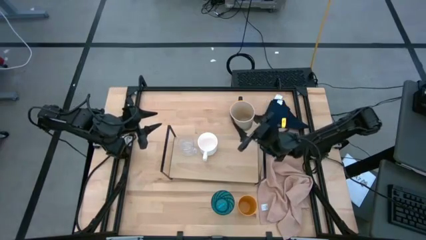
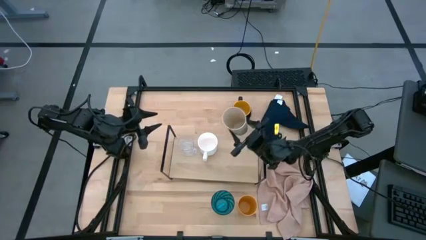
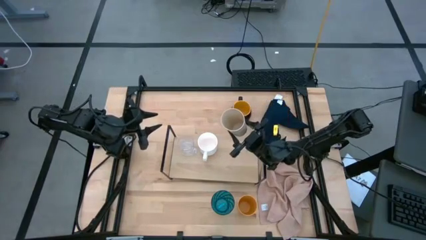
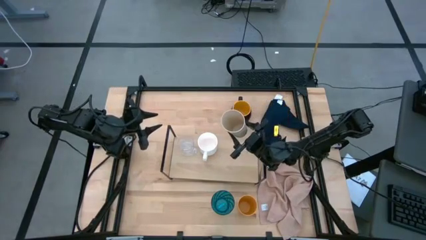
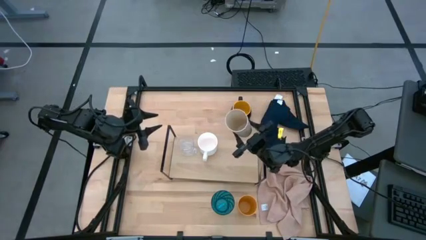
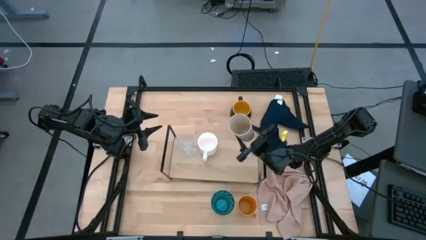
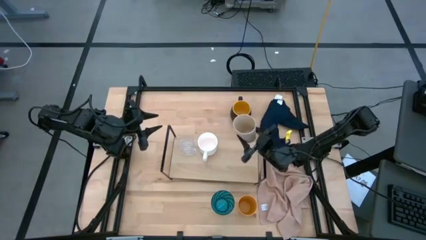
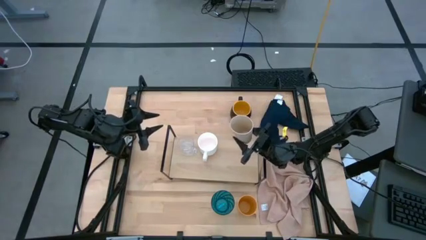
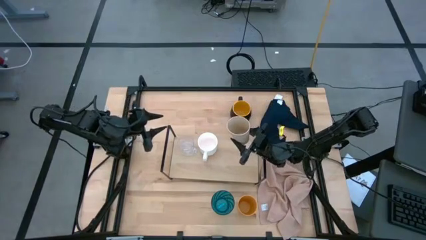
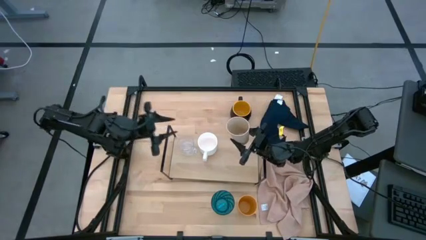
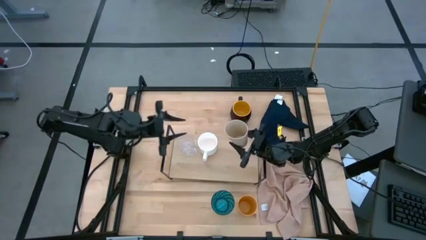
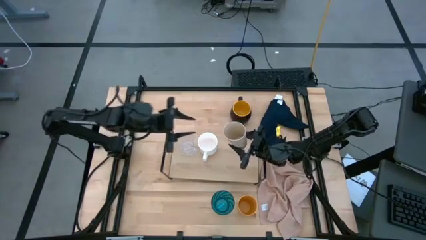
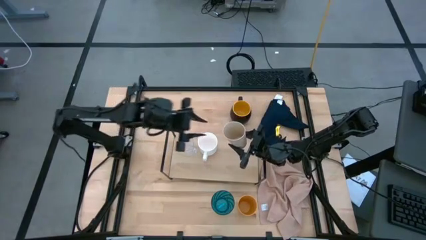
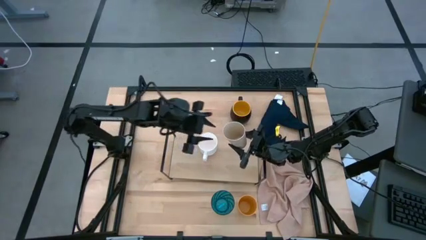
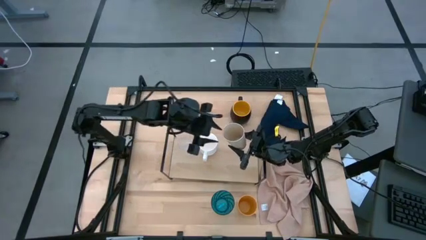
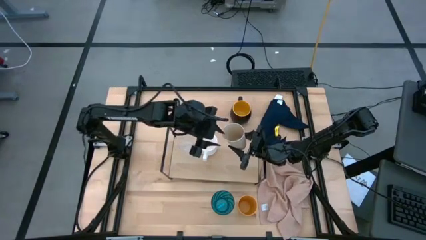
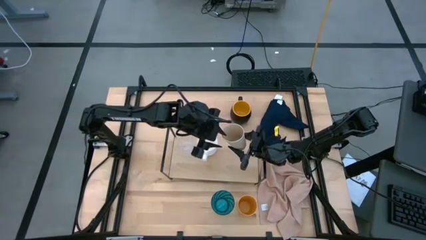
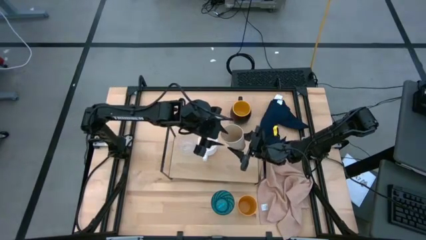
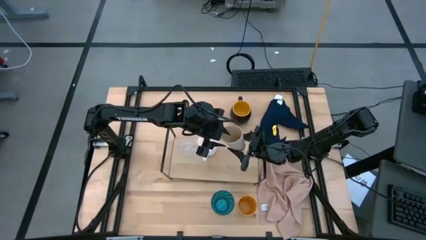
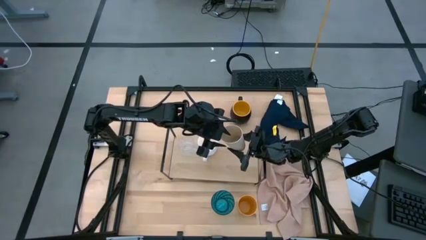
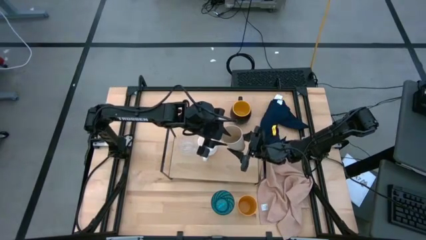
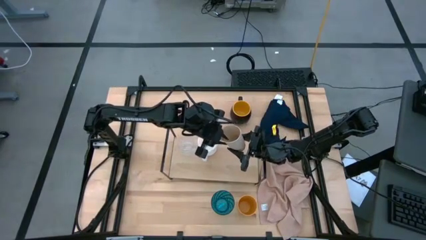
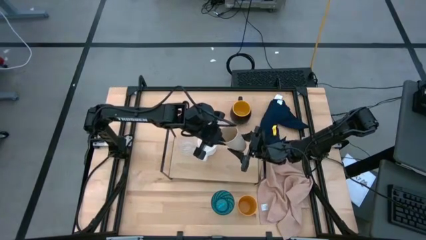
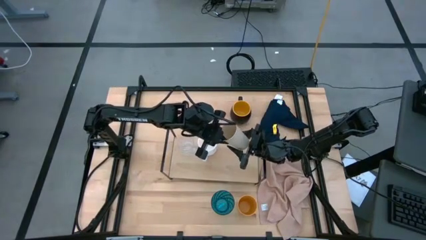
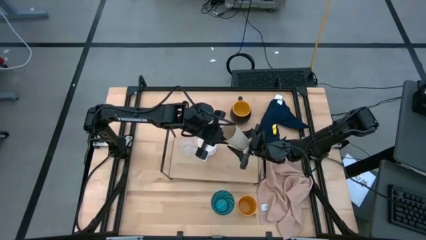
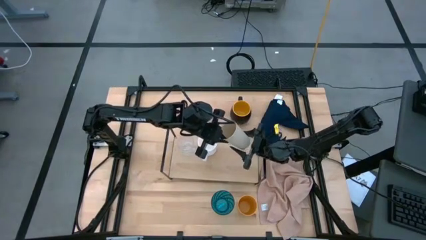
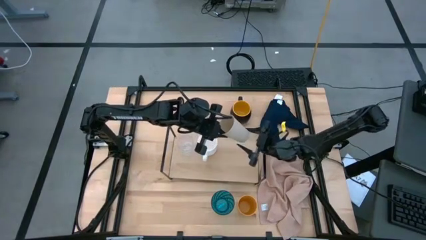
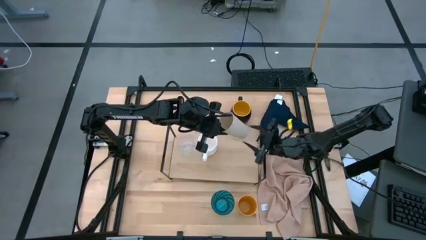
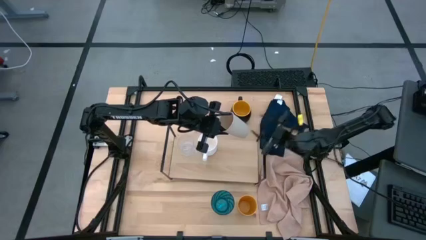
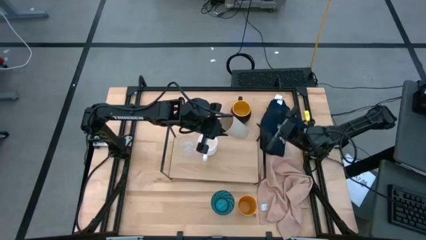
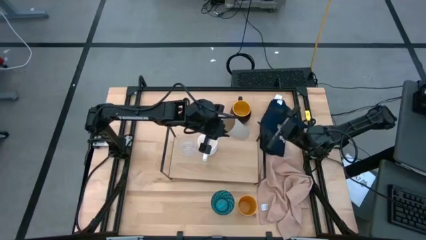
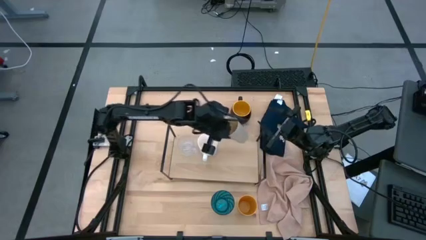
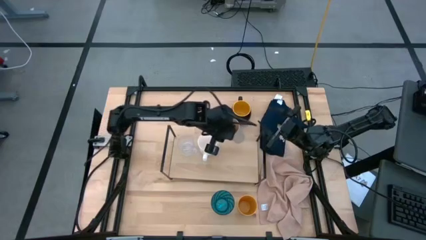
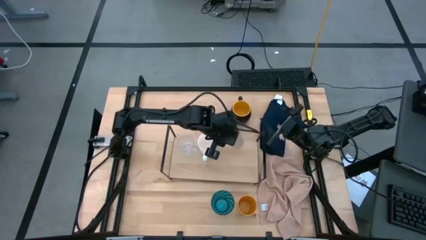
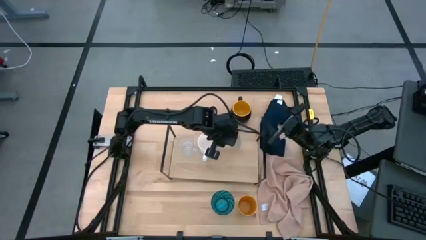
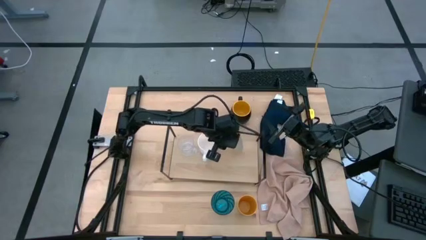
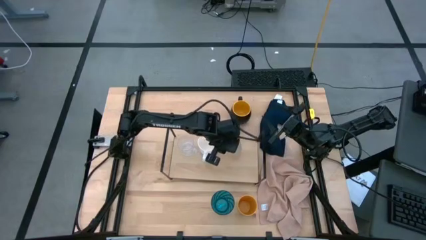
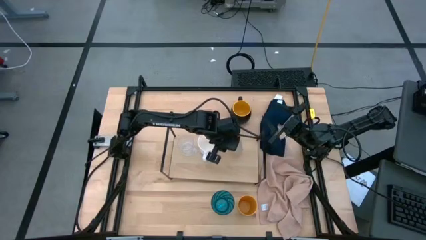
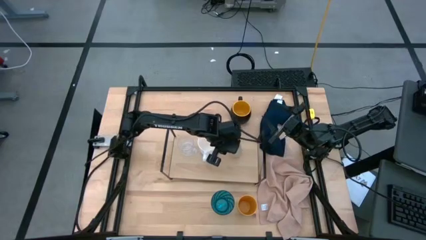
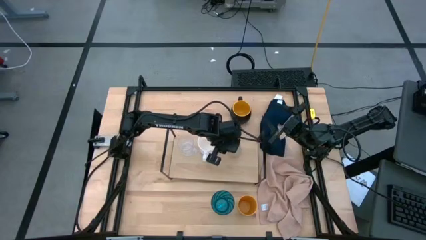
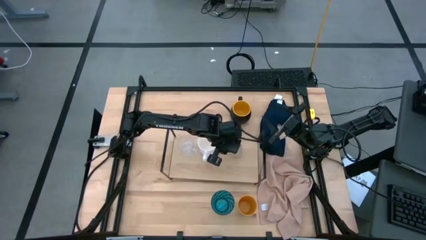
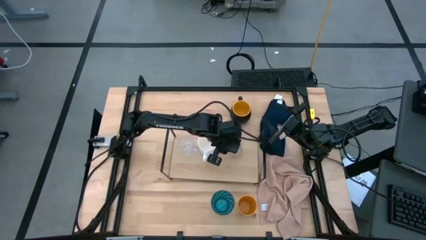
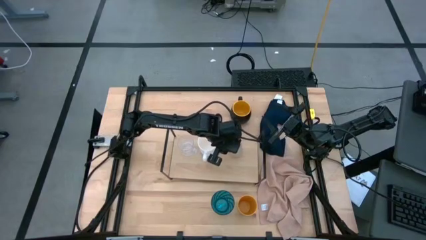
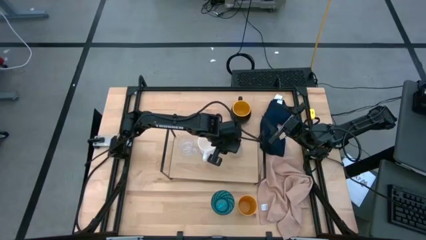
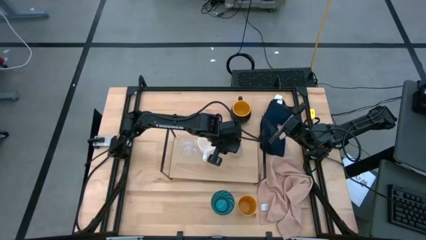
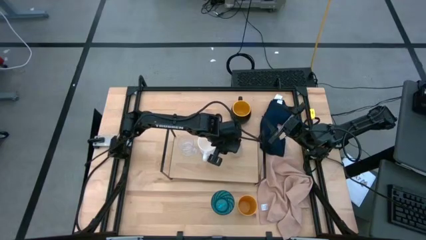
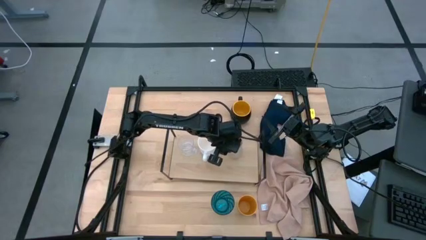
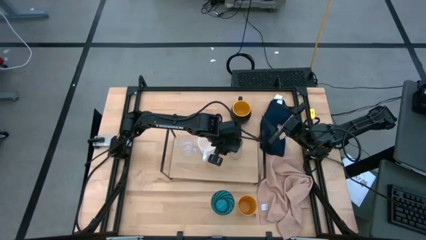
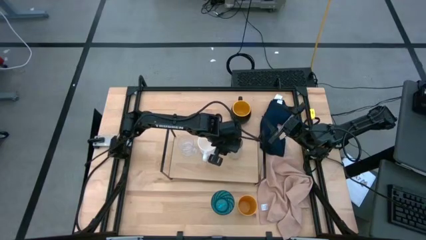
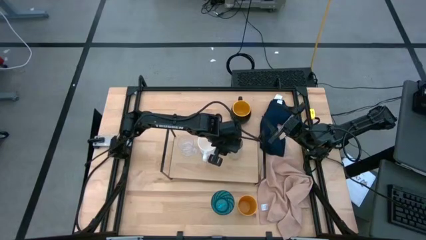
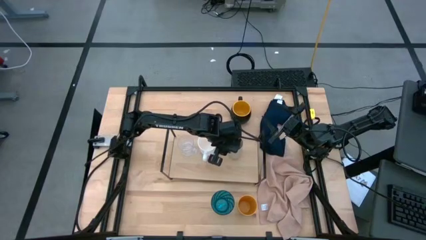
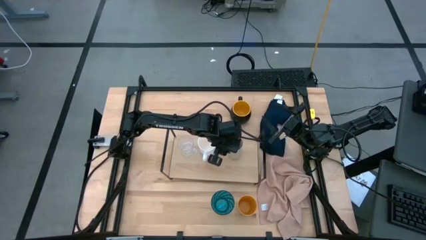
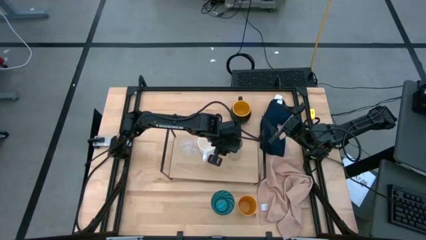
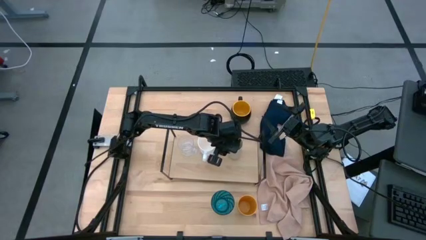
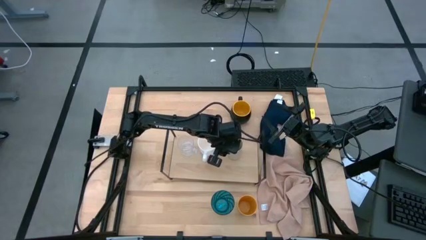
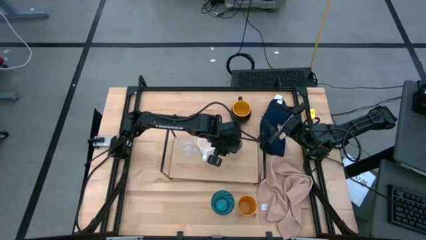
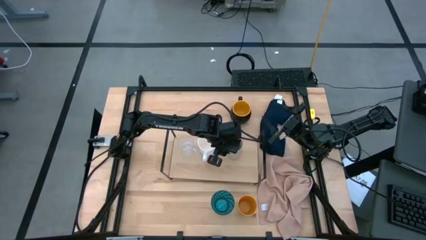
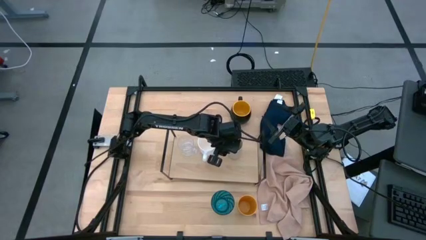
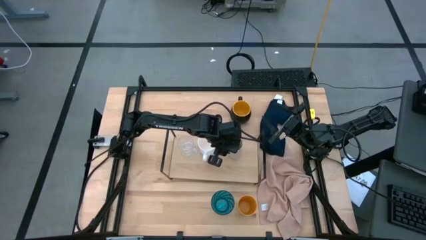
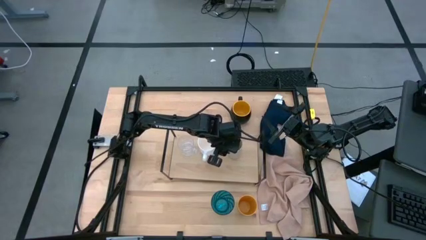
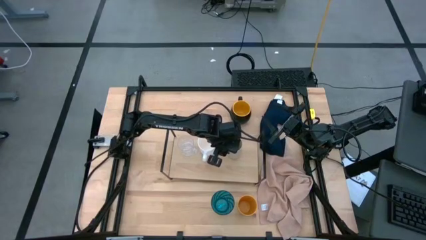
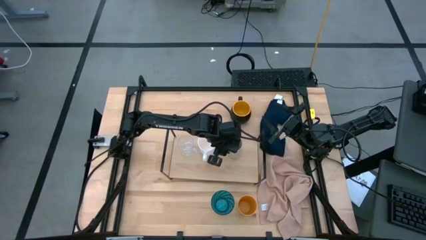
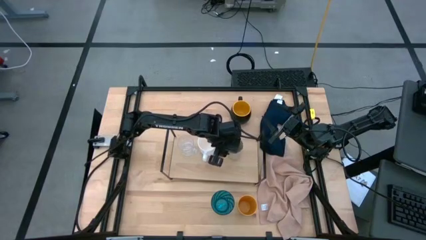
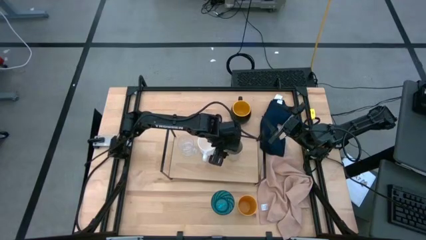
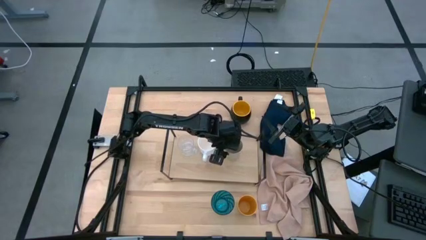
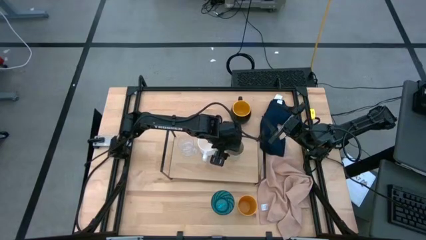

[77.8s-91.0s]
Task: Stack small to large cups/mugs on shelf
Put the white cup on the shelf

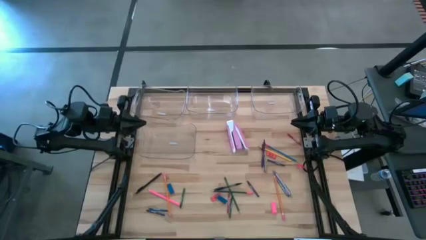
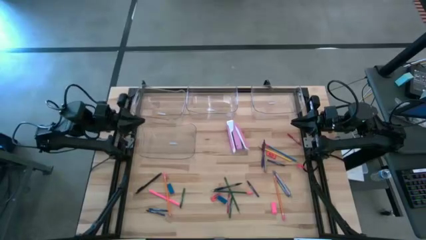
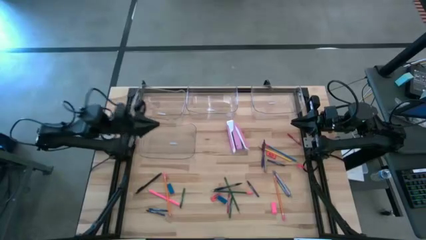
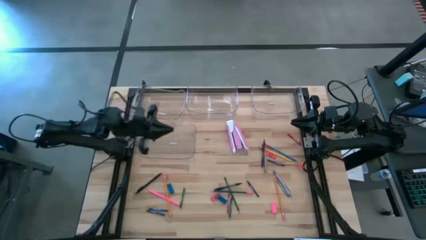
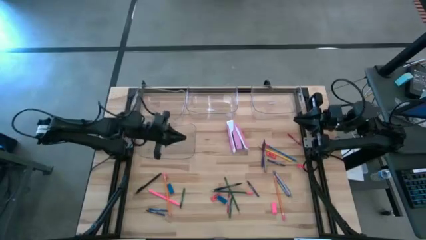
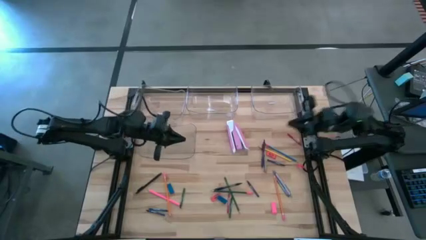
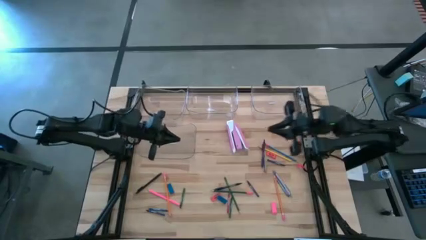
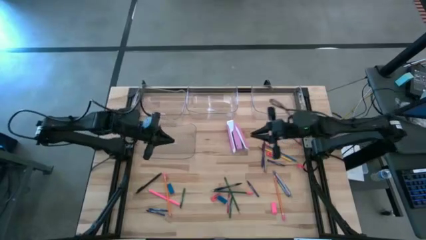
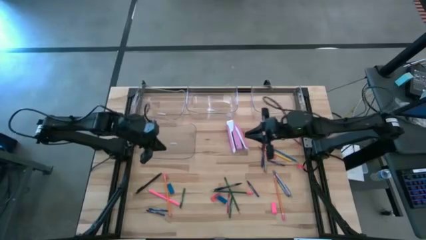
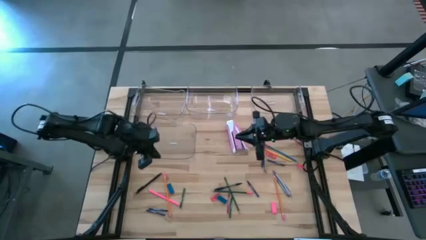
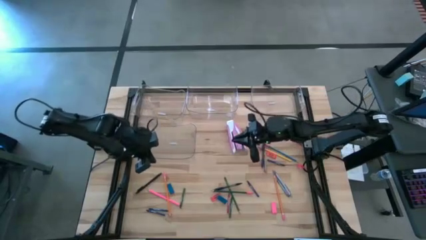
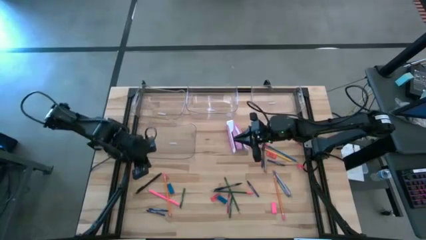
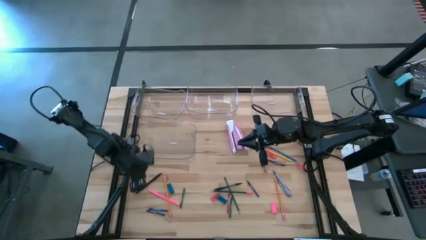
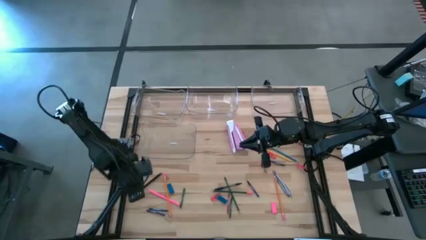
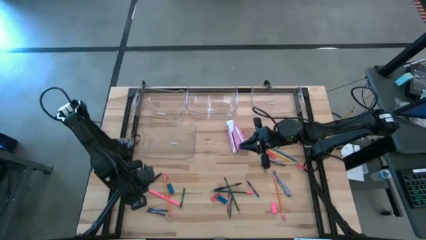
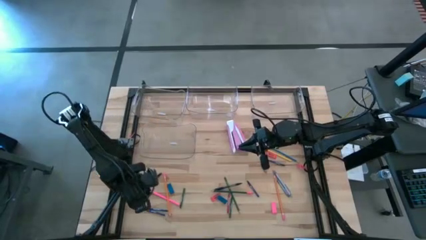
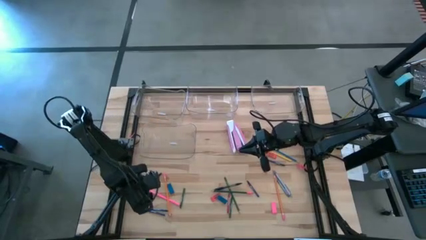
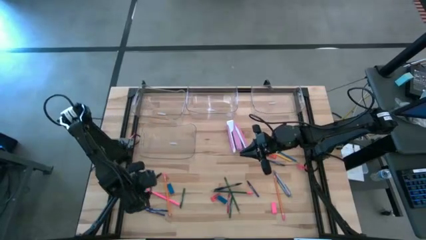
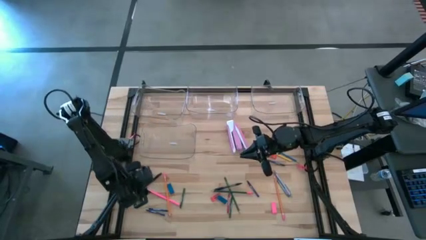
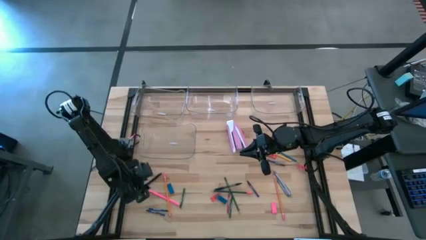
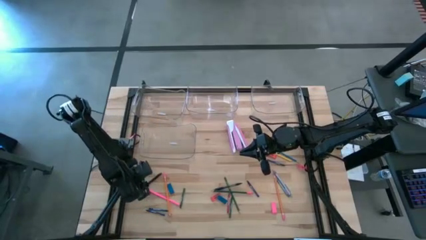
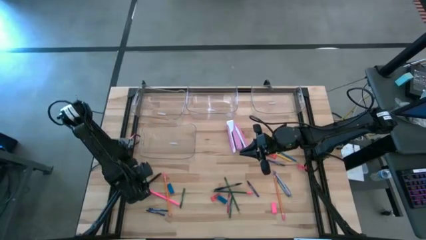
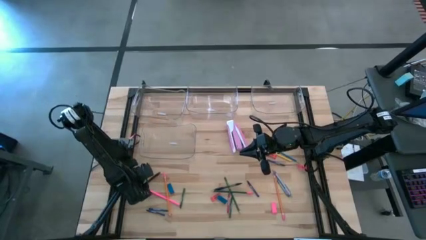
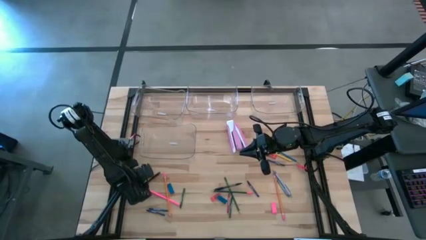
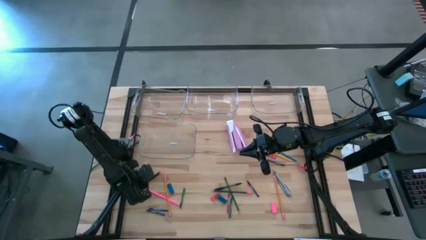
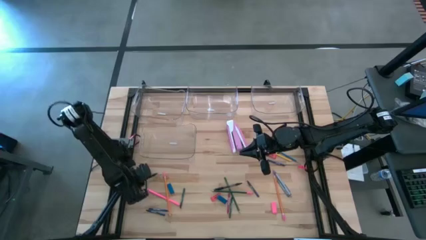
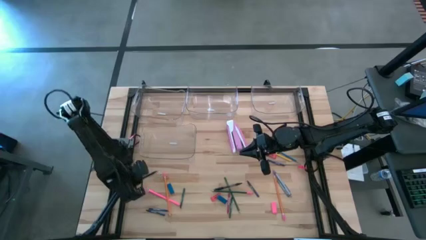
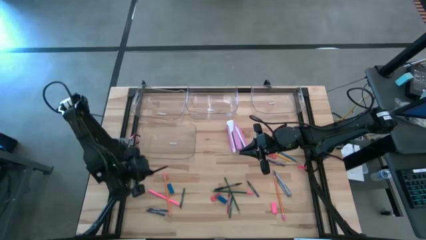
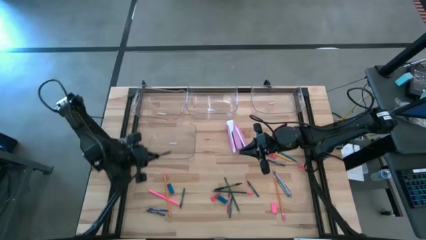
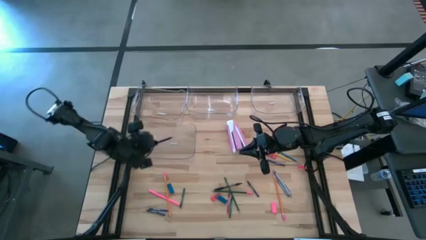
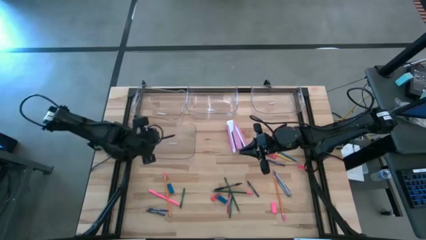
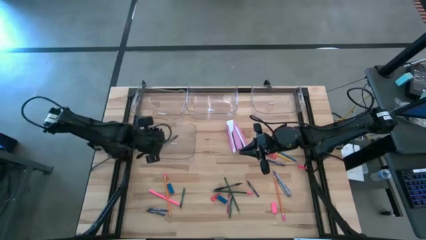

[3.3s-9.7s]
Task: Sort crayons/erasers/pens/pencils in bins
Put the black pen into the bottom left transparent bin
